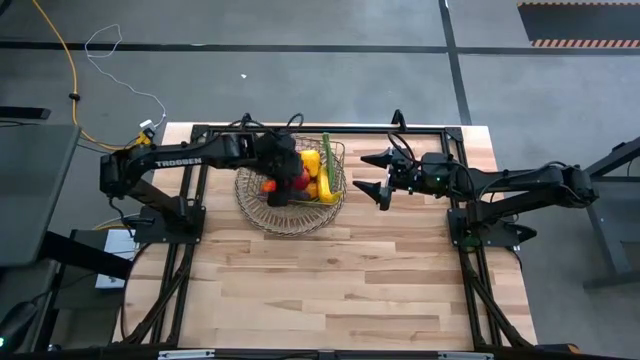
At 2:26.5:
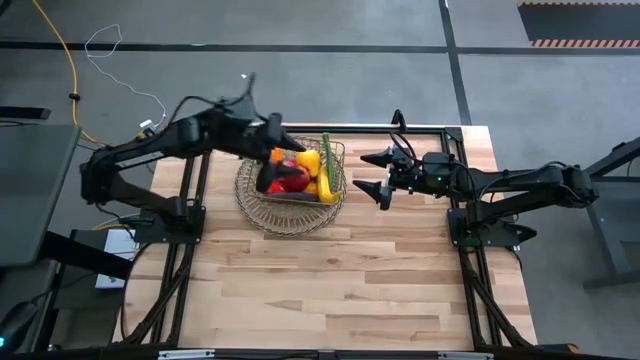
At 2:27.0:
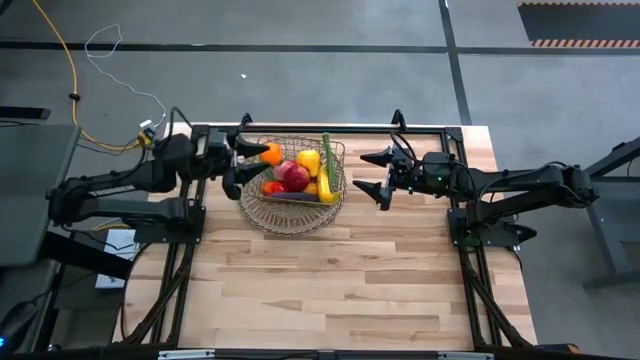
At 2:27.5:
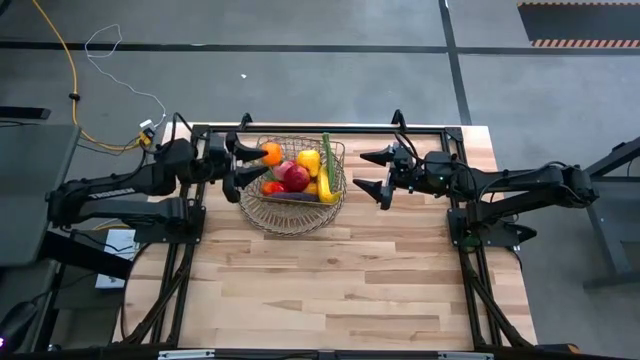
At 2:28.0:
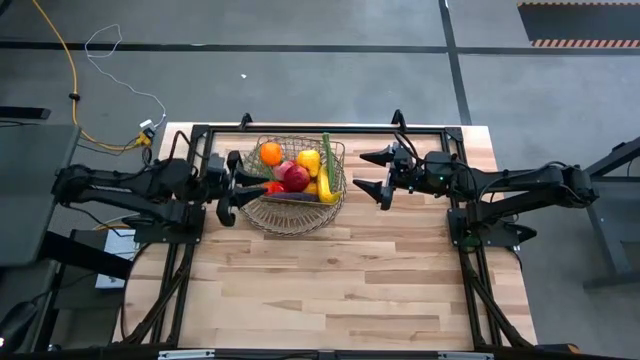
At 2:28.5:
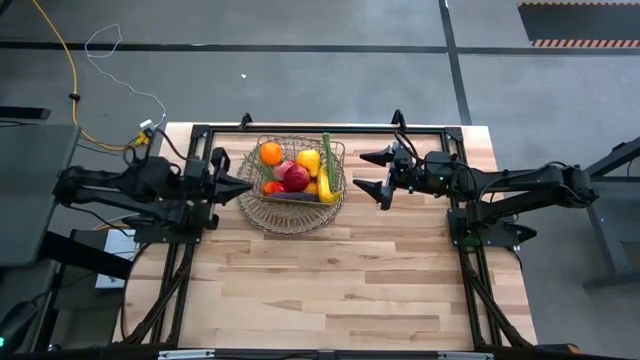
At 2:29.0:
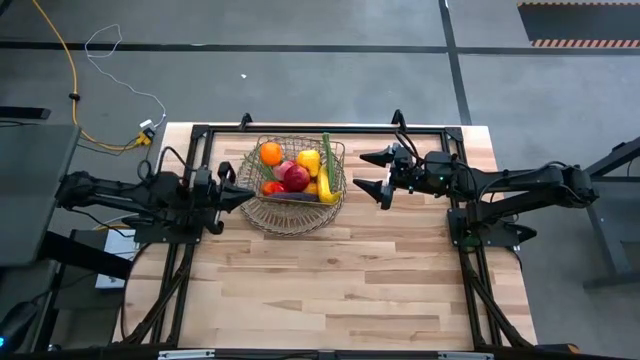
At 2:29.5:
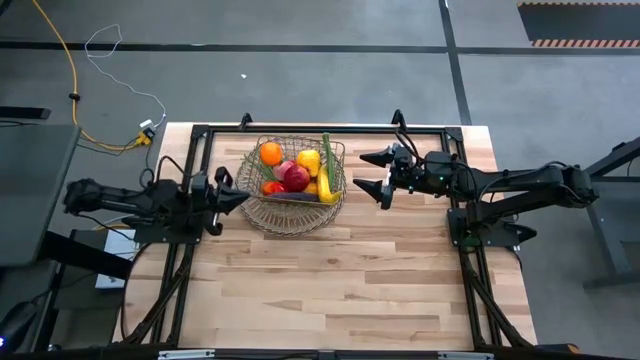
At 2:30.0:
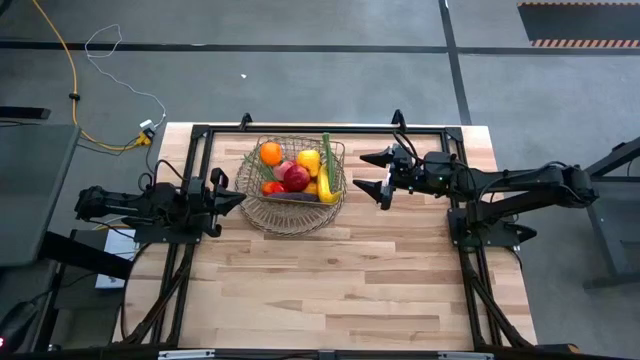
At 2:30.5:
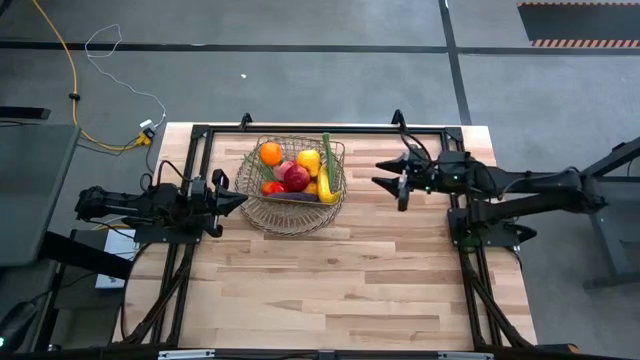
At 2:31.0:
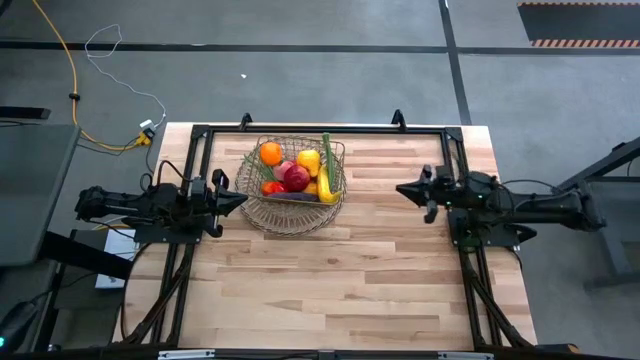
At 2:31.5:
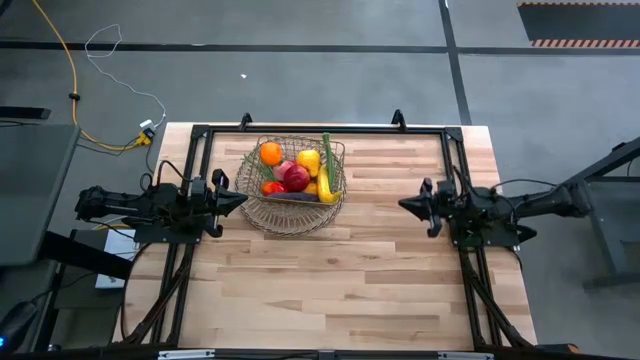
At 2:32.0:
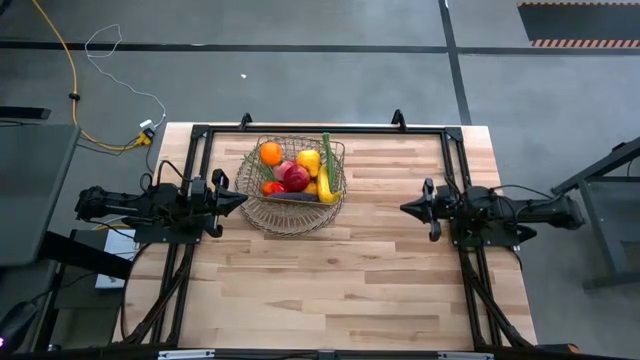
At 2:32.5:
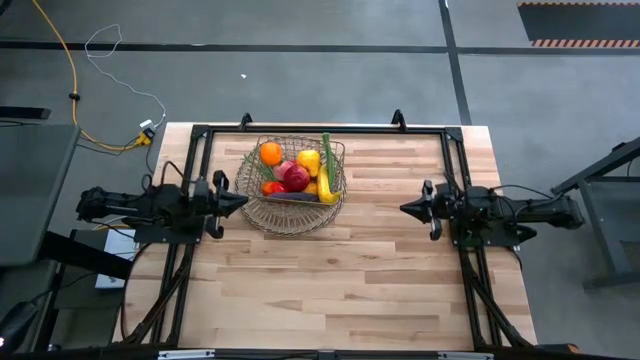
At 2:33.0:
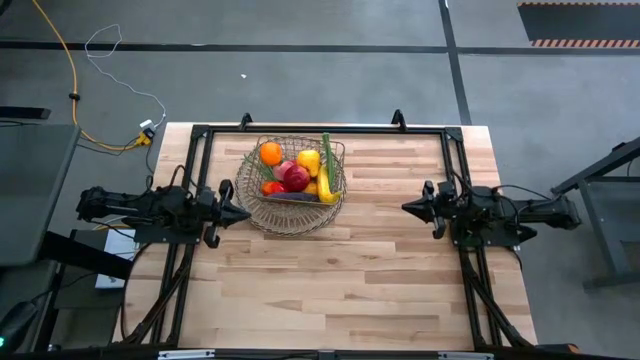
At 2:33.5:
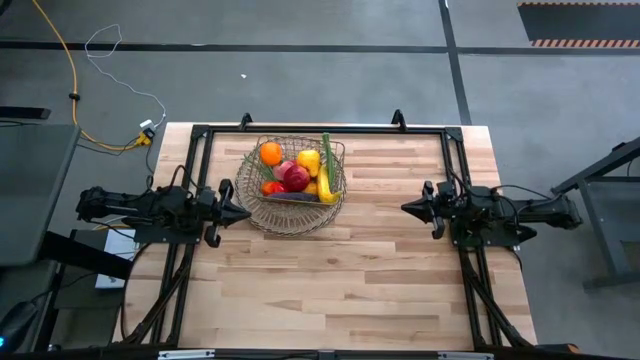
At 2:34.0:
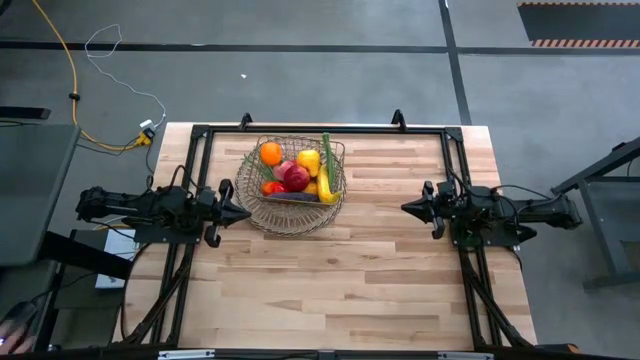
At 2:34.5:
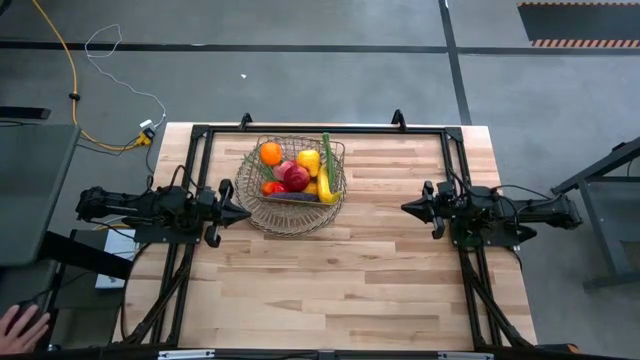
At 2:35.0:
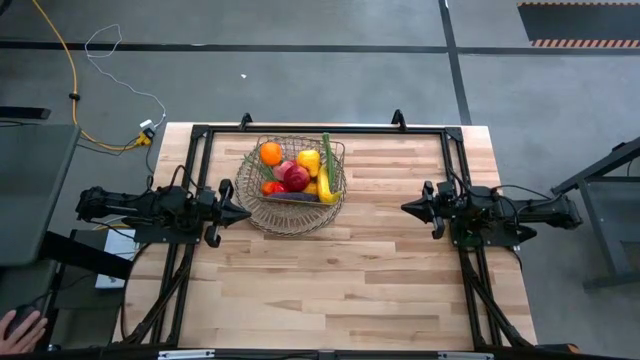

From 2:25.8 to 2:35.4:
Task: Build produce basket
Return to Home Position

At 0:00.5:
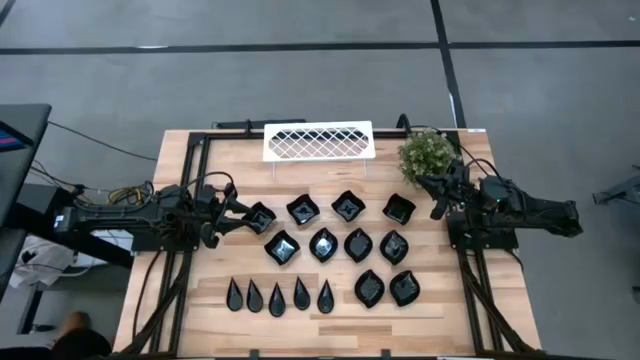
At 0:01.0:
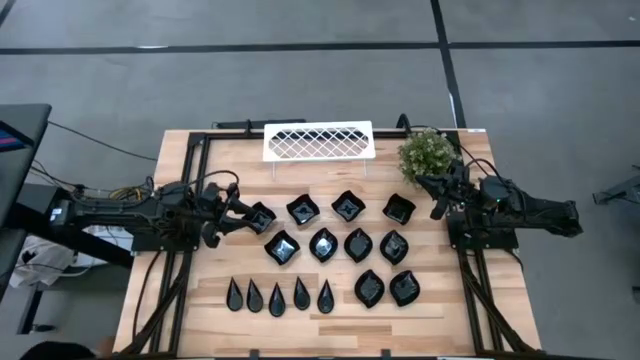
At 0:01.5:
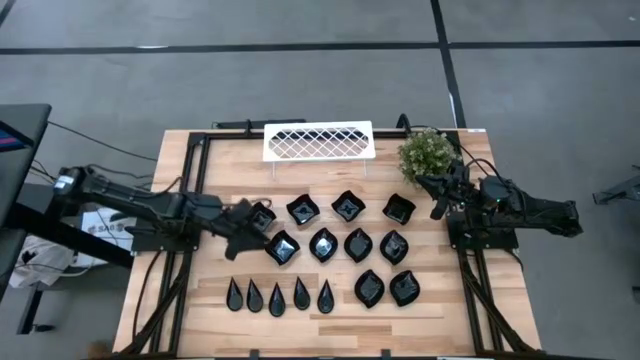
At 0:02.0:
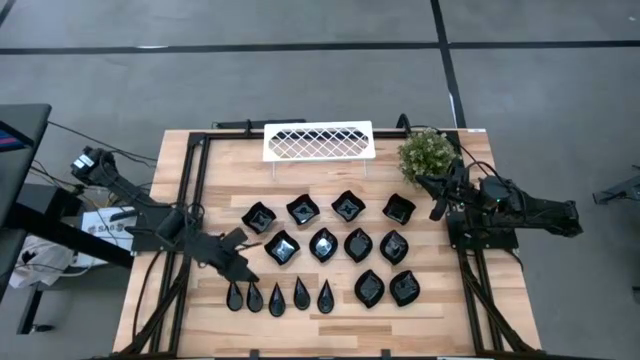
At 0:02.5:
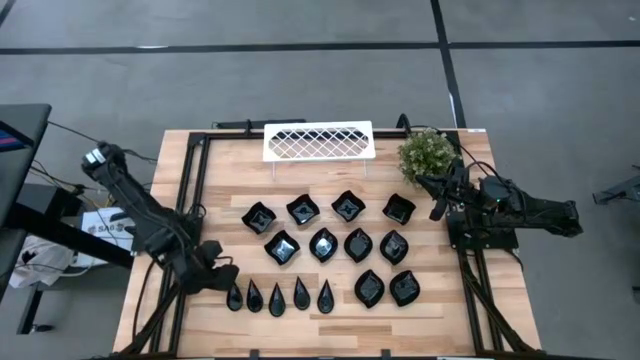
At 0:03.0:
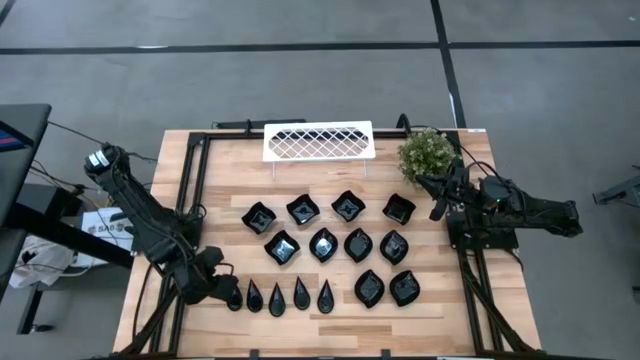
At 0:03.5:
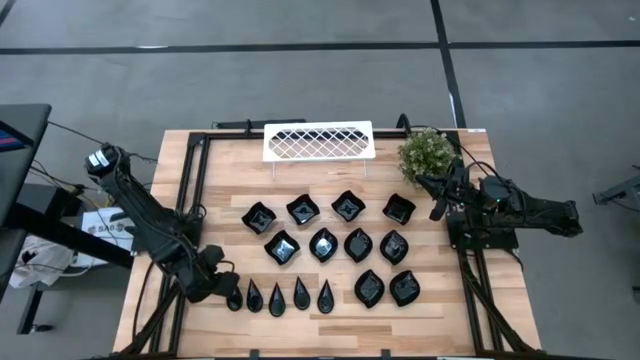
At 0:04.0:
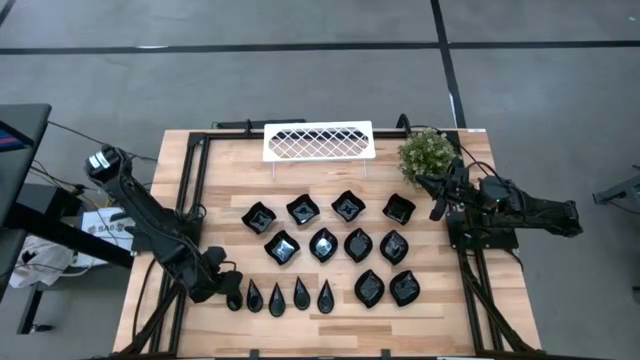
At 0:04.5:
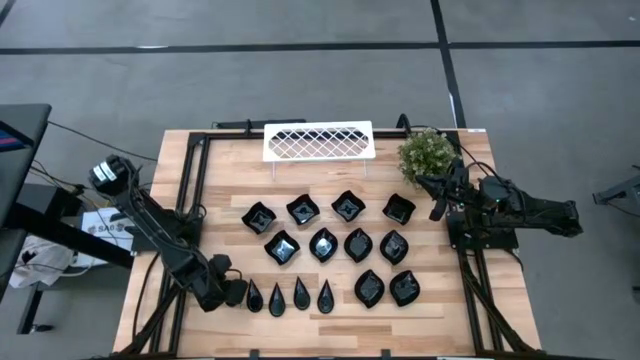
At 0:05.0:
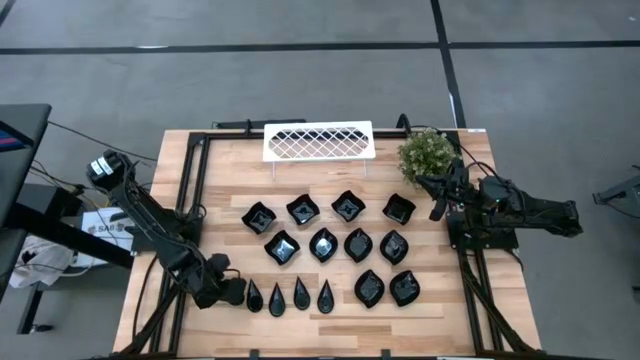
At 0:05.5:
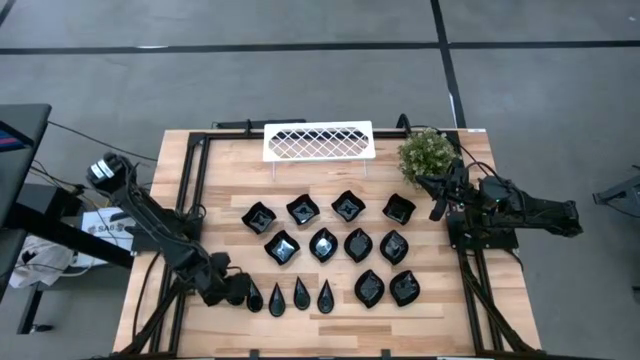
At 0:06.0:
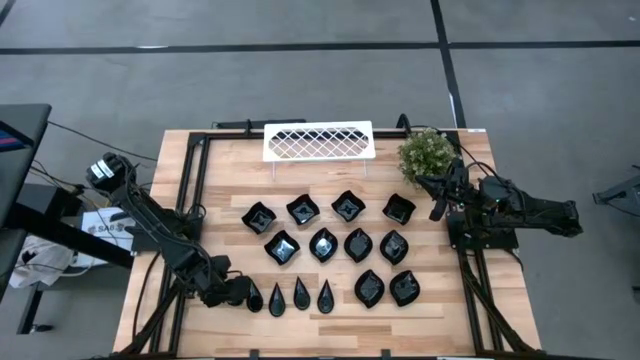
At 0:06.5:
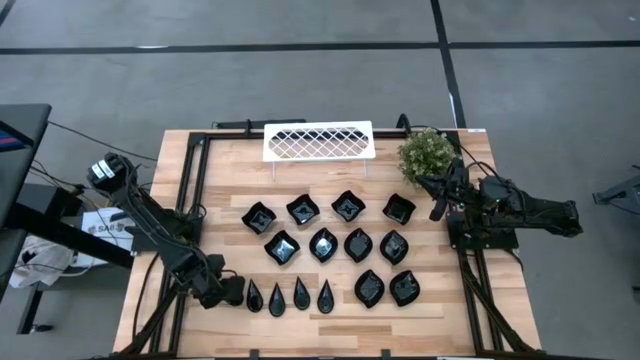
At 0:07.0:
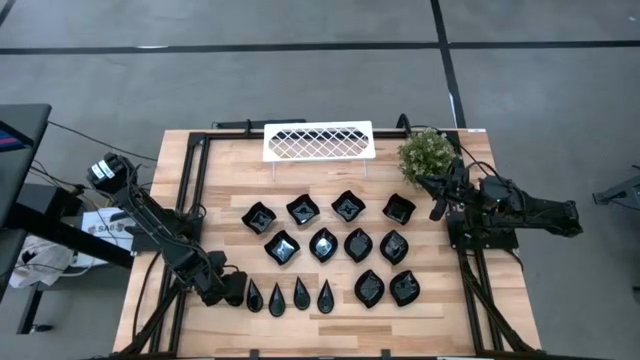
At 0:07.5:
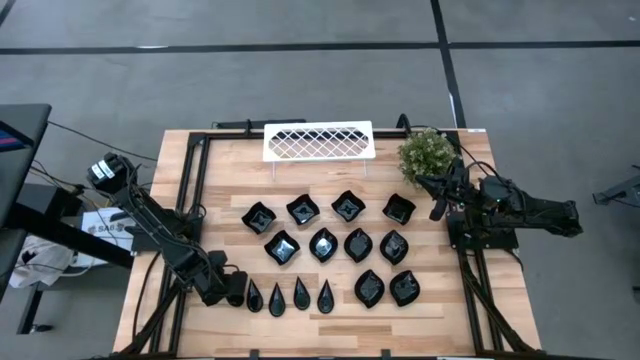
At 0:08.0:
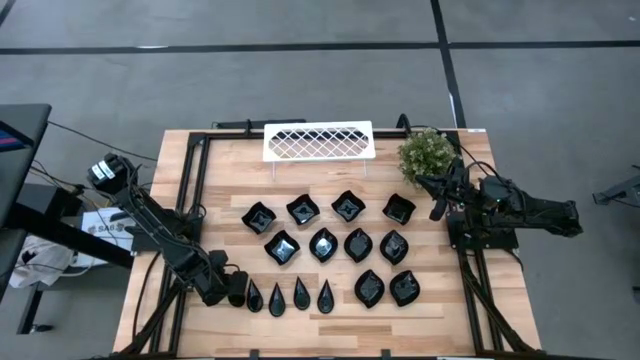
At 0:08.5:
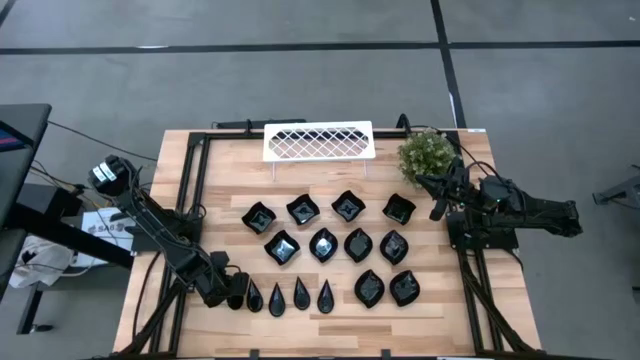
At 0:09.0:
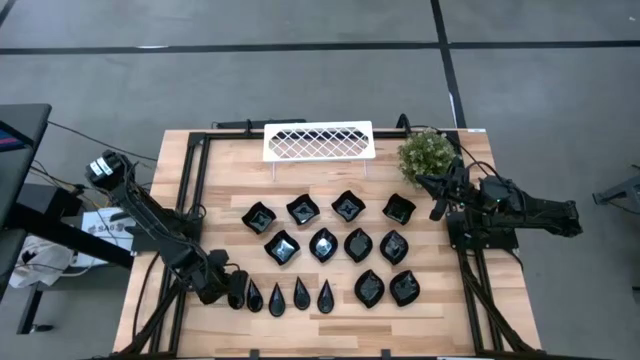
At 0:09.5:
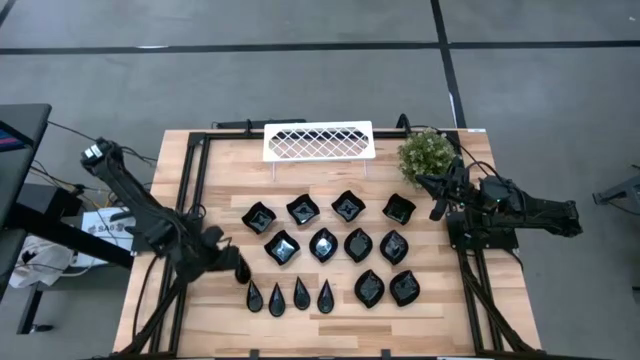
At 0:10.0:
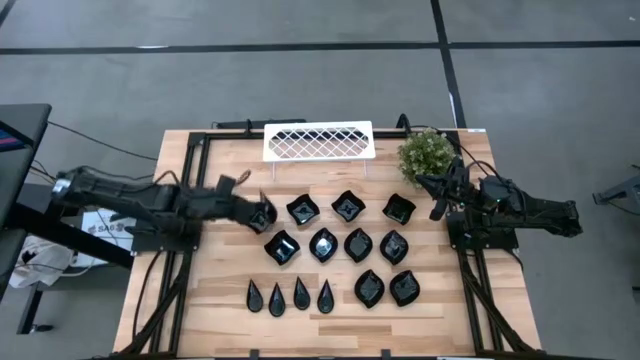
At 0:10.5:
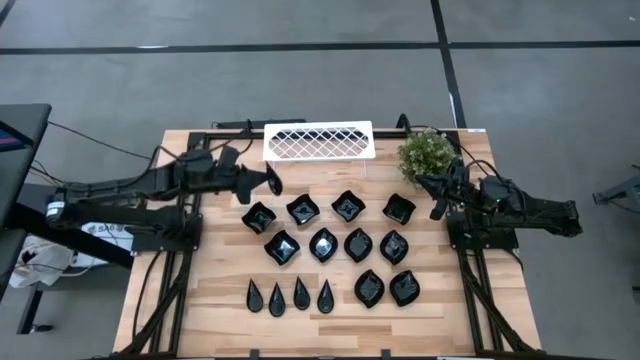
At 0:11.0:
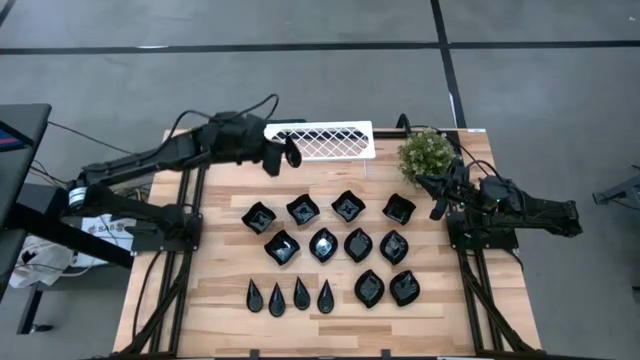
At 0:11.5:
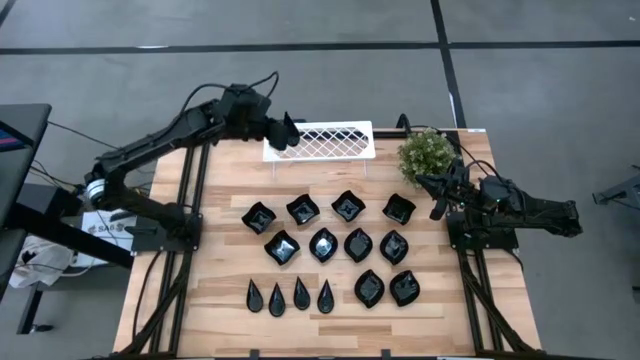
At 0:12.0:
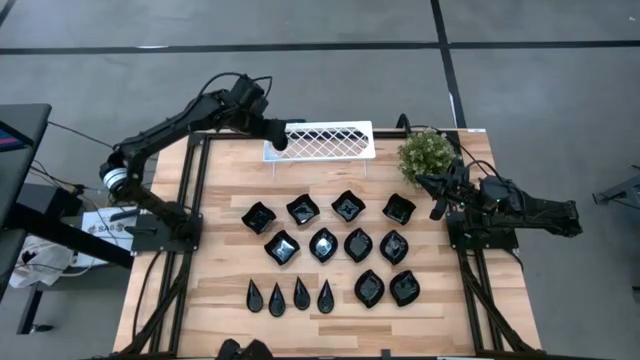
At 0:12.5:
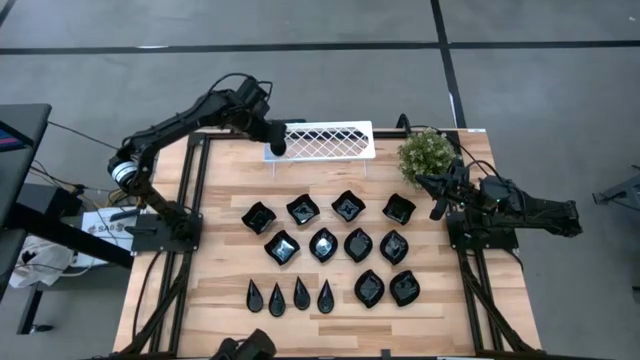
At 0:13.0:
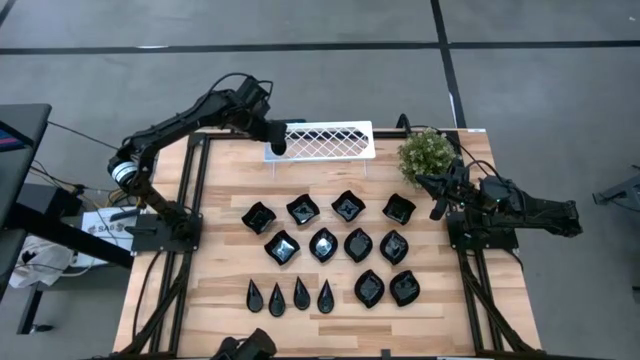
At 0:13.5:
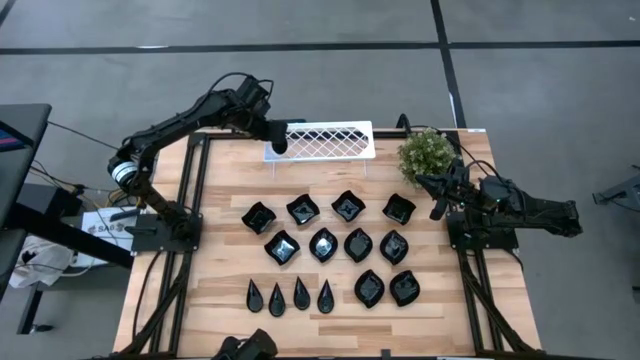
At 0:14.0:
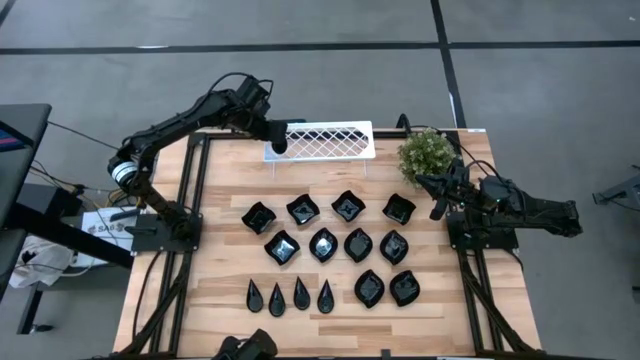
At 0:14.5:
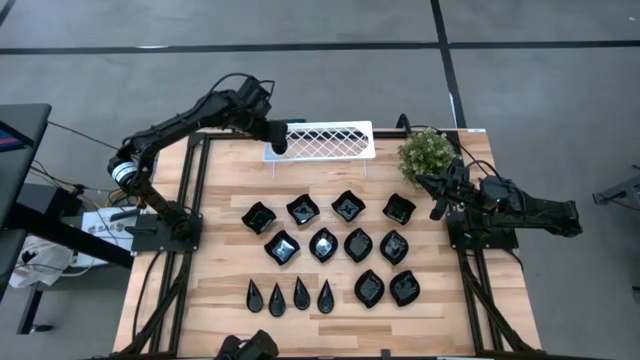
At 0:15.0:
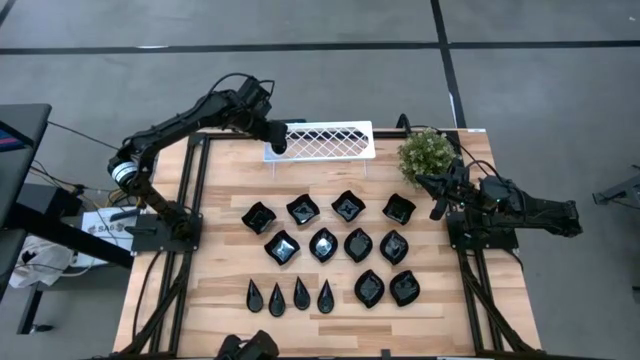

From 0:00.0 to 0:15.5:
Task: Pick & Place Mini shaped plates
Put the black drop-shaped plate on the shelf
